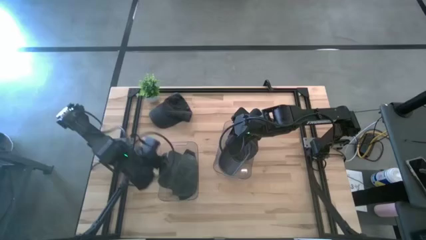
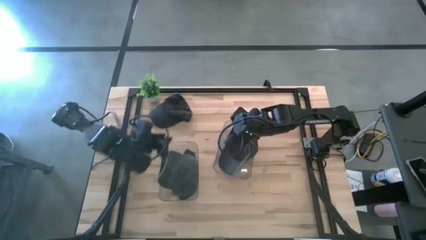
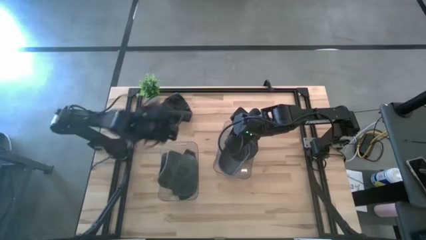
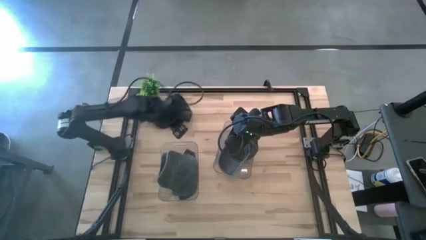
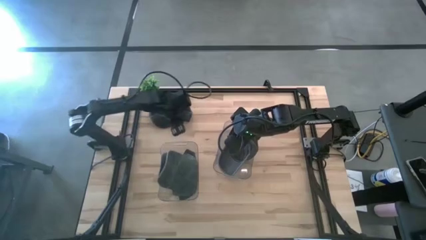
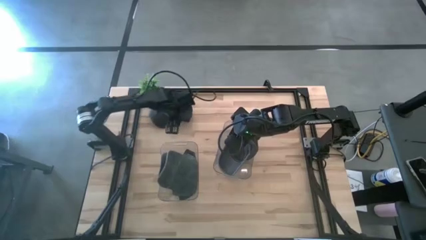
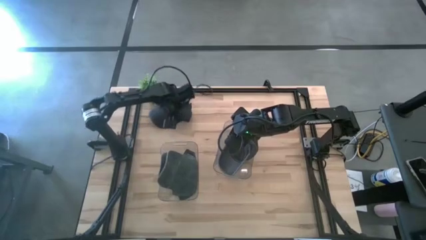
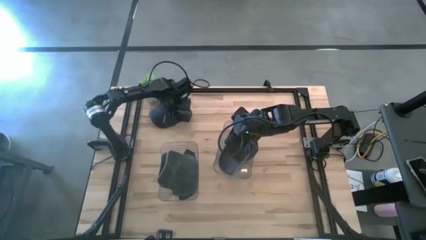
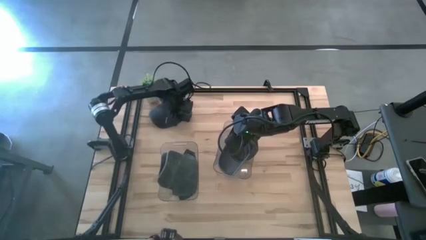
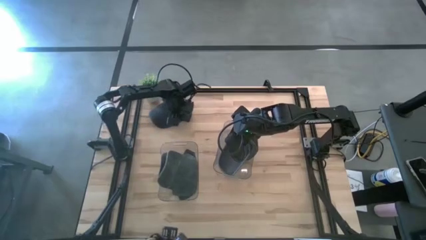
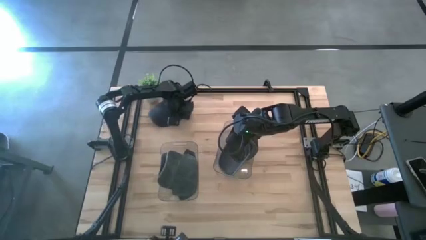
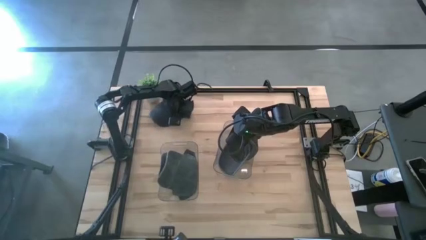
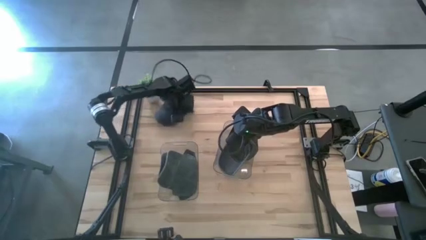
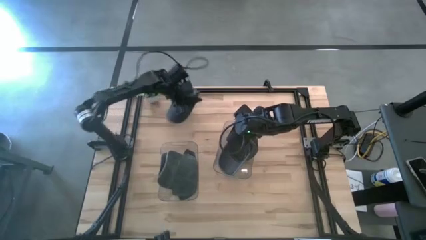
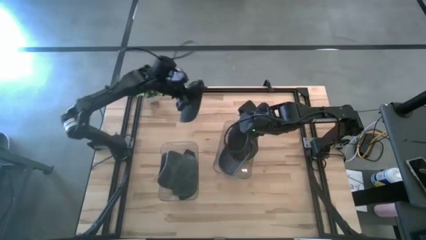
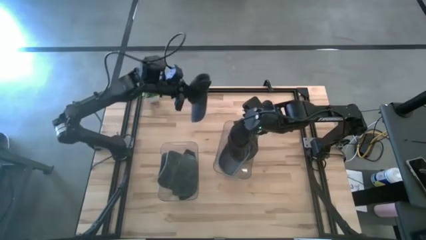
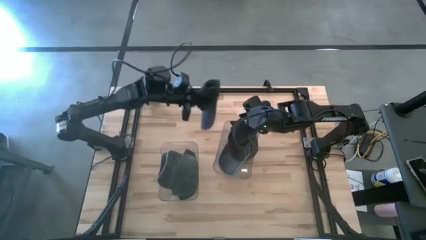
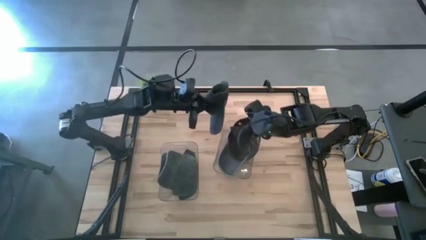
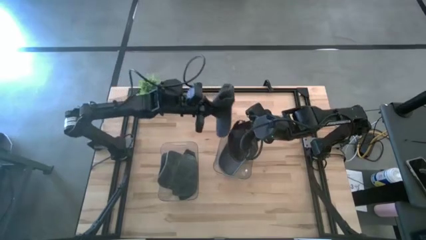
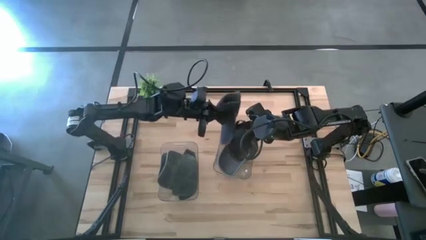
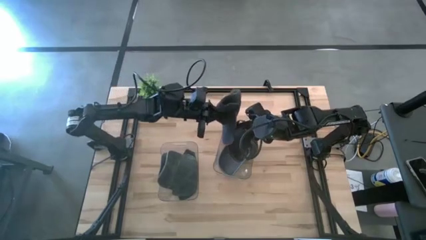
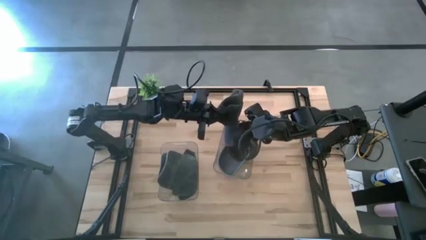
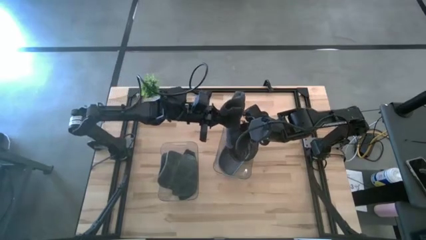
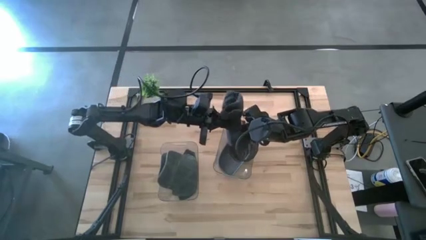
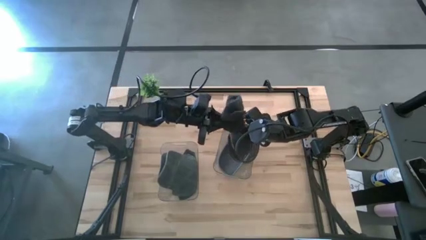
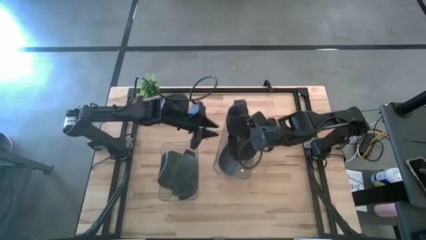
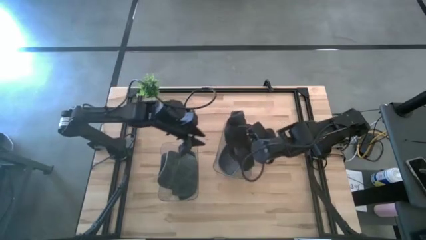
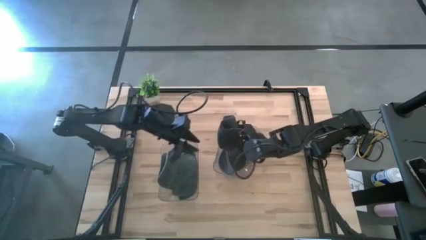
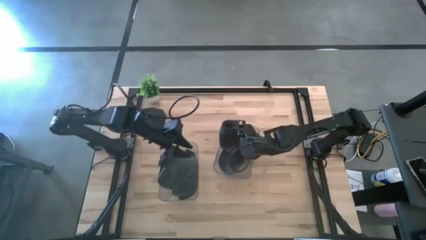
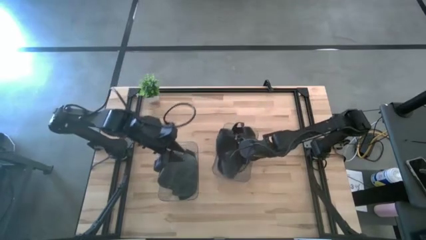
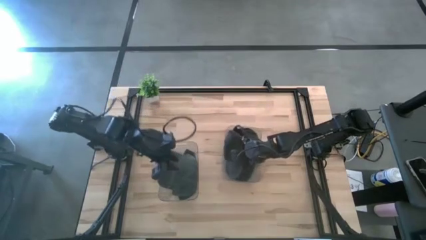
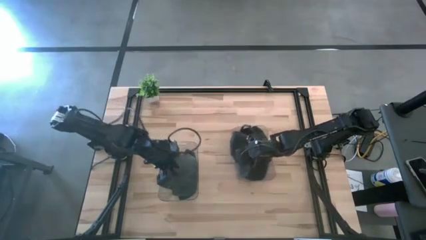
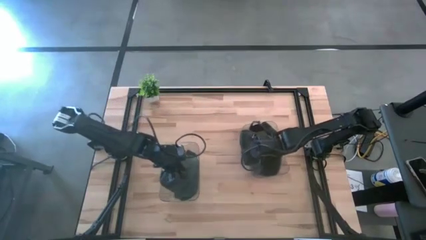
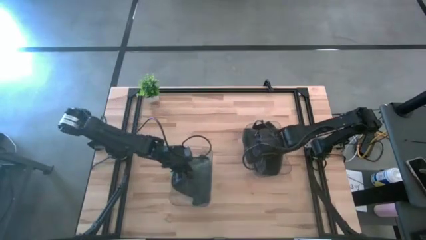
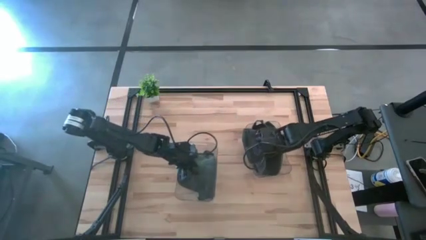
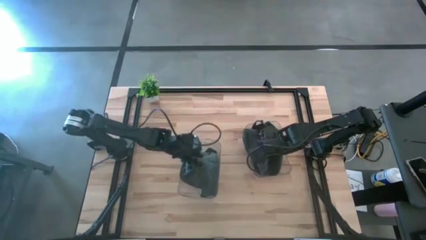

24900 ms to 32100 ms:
Task: Pick & Place hat
Put the black cap into the right transparent bin

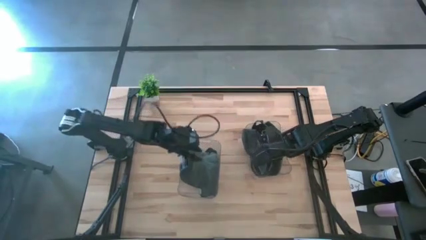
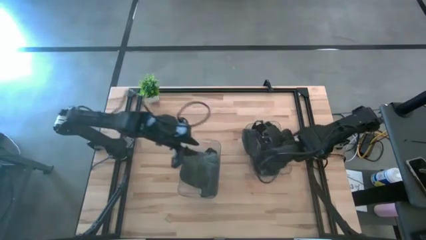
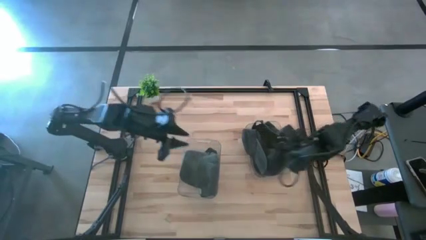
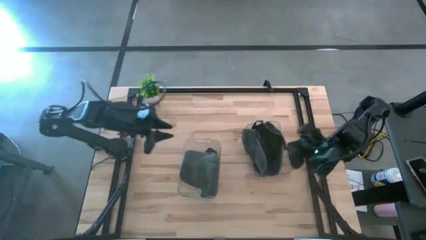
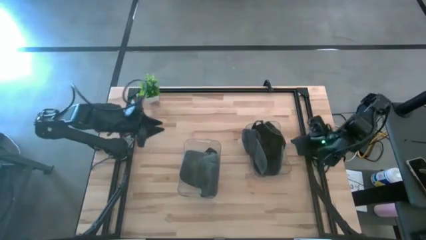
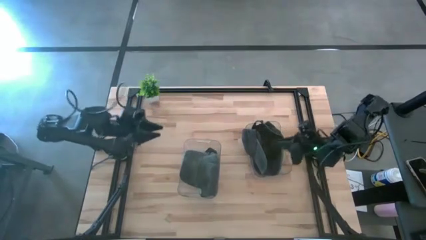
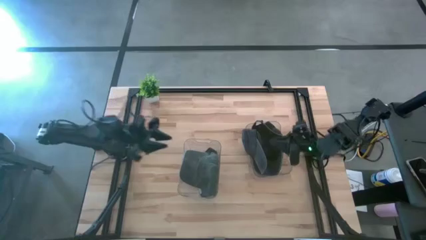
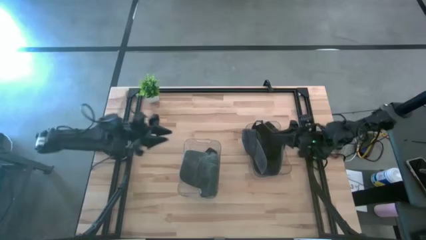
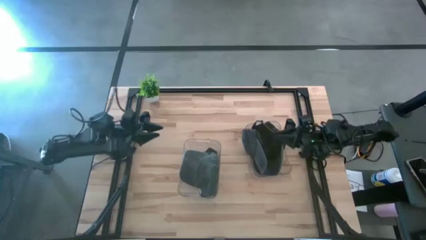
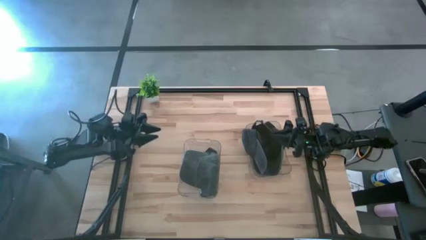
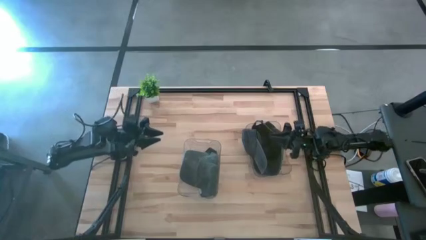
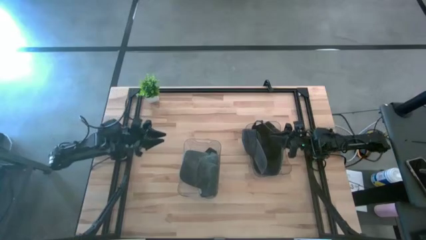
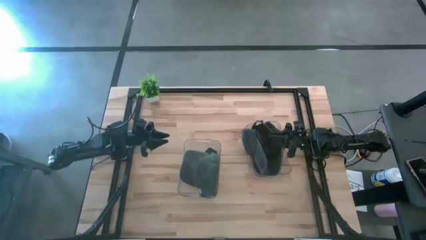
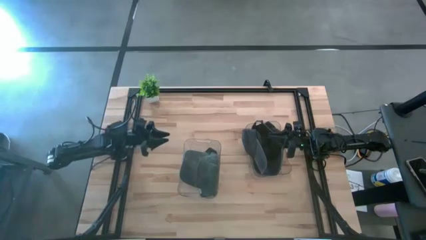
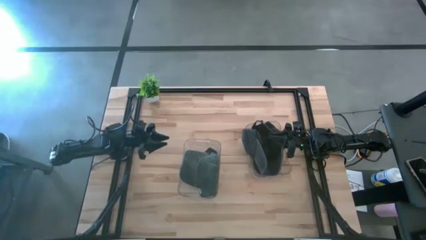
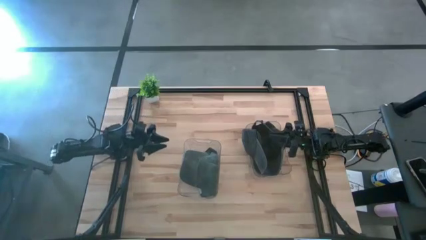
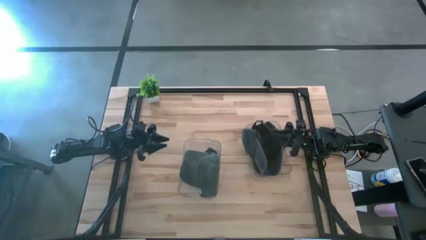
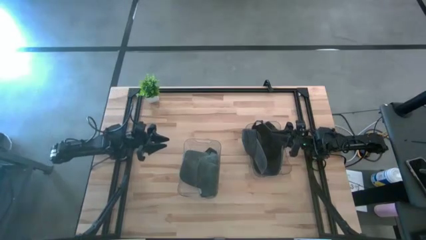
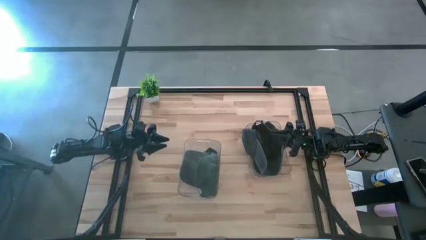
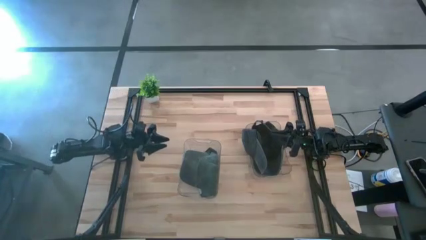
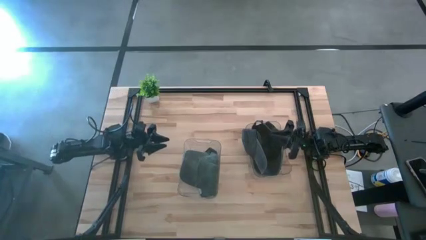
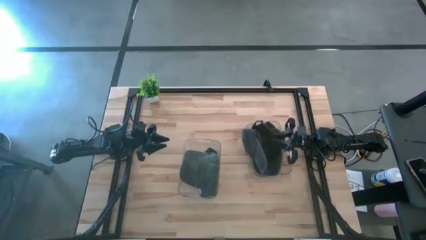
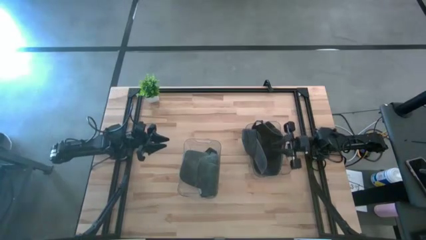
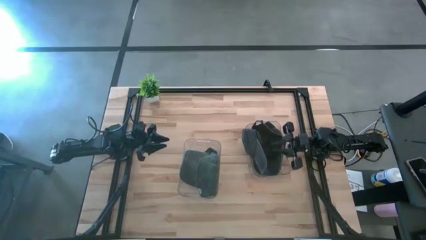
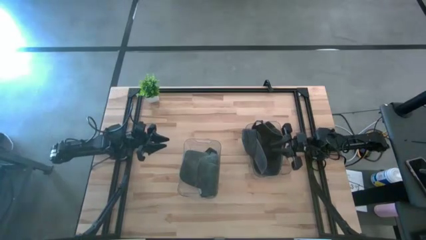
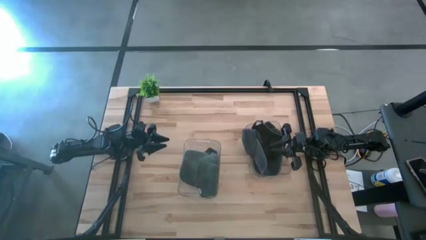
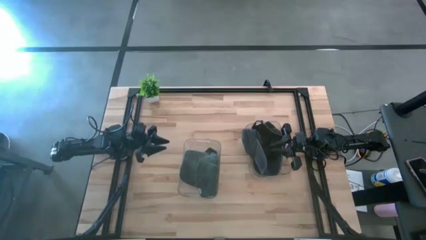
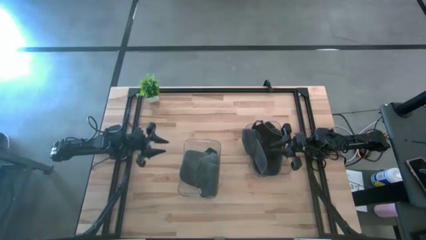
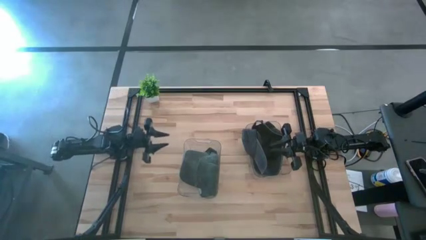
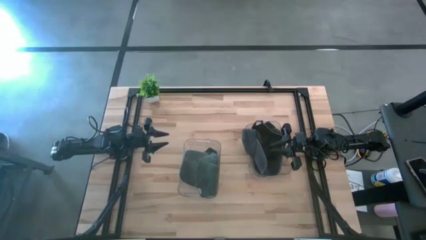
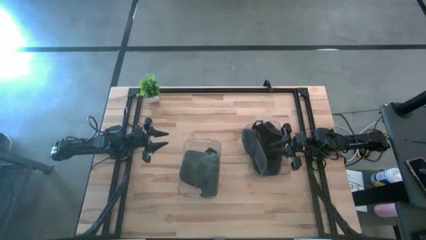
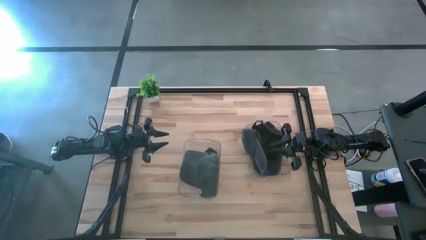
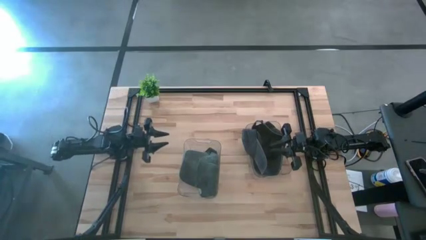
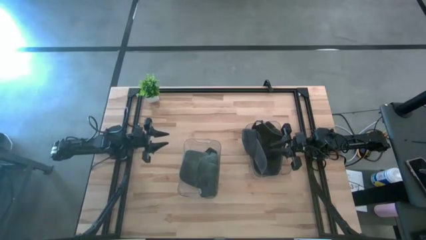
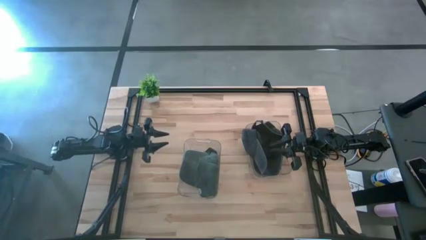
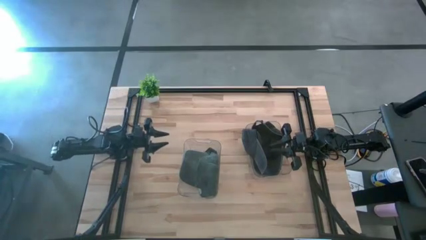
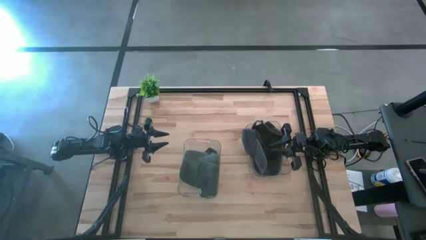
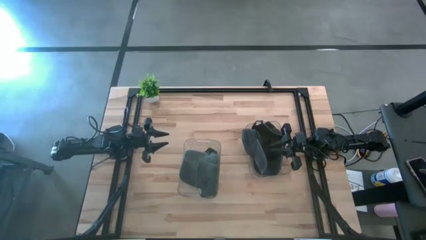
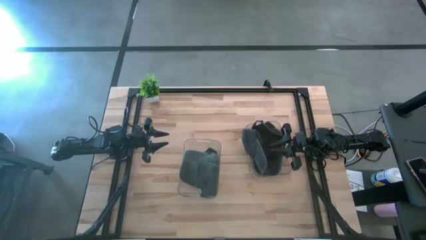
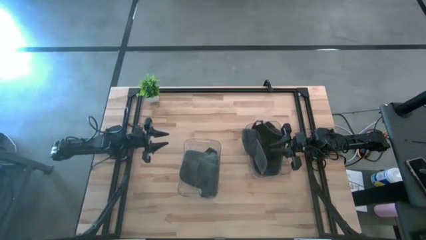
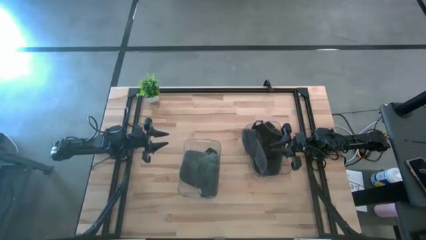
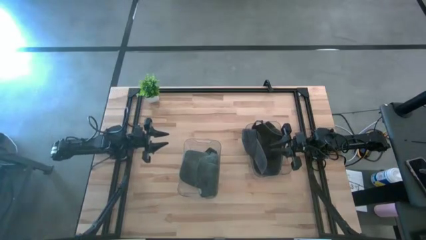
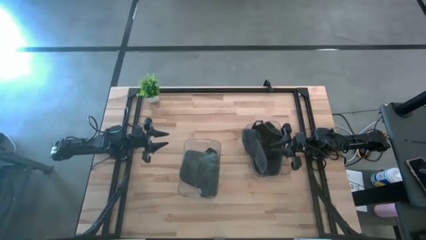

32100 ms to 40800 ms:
Return to Home Position
